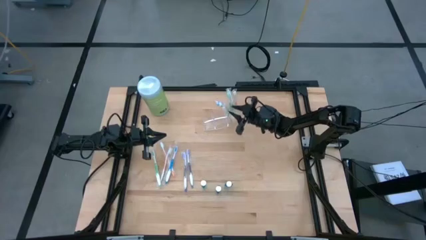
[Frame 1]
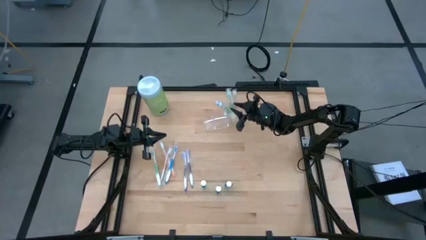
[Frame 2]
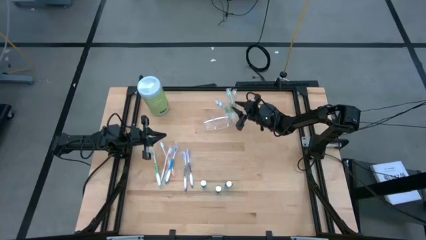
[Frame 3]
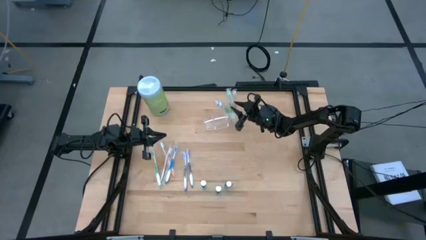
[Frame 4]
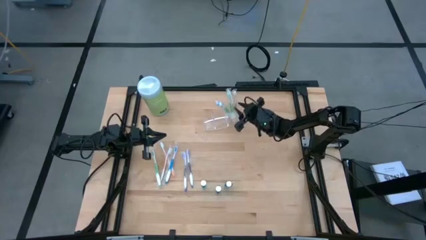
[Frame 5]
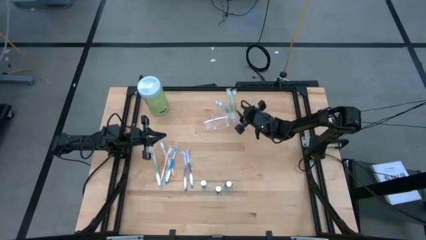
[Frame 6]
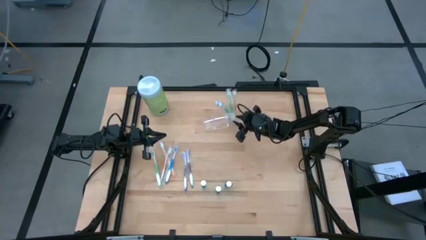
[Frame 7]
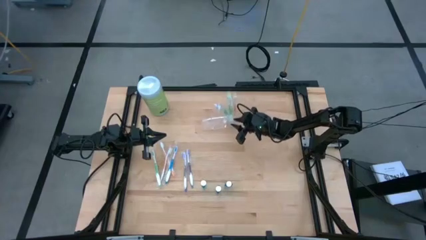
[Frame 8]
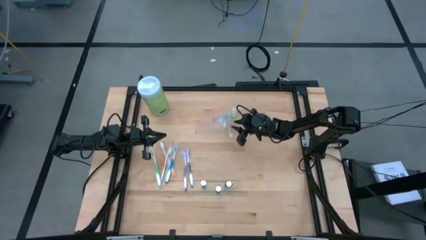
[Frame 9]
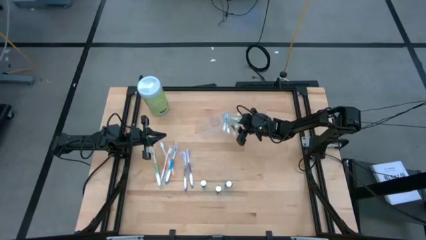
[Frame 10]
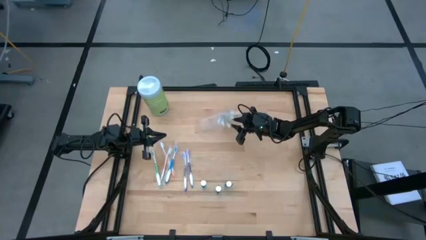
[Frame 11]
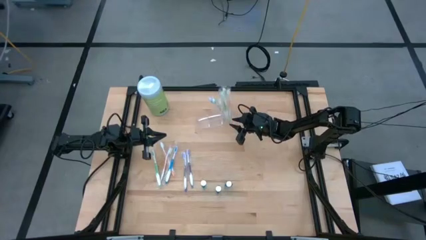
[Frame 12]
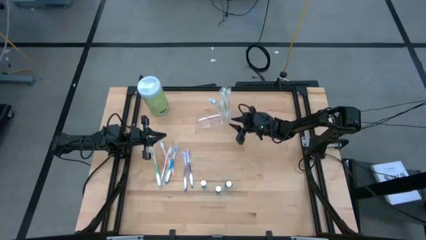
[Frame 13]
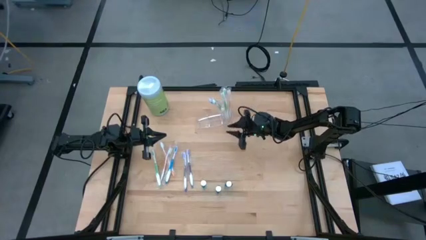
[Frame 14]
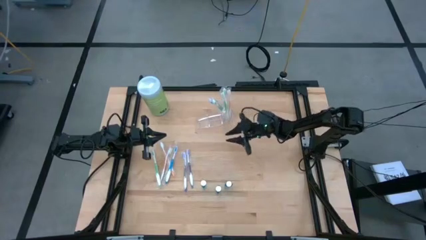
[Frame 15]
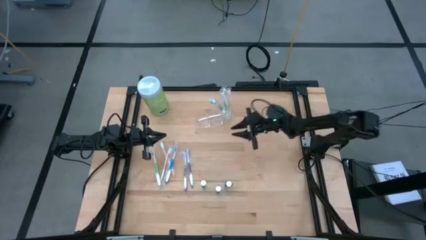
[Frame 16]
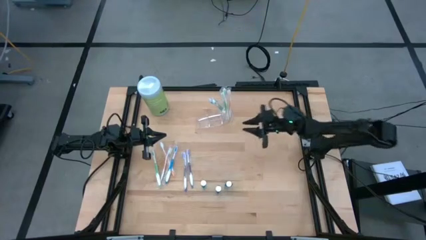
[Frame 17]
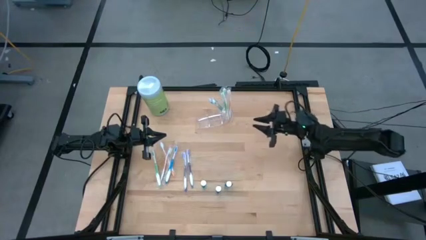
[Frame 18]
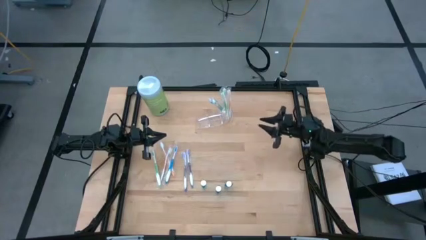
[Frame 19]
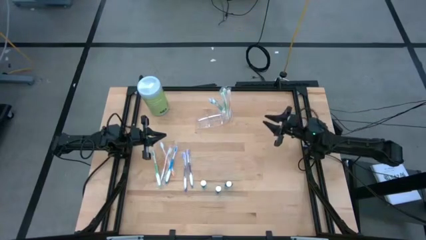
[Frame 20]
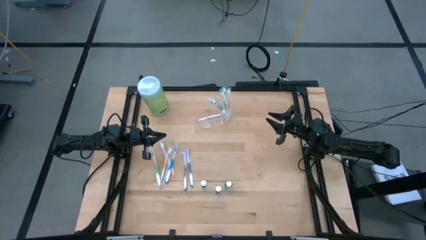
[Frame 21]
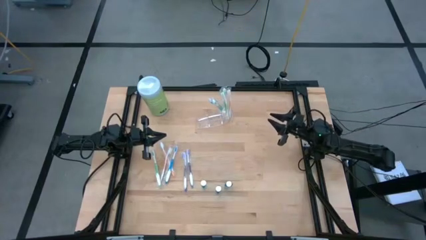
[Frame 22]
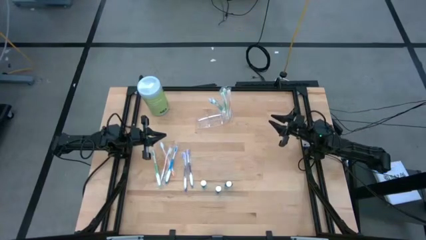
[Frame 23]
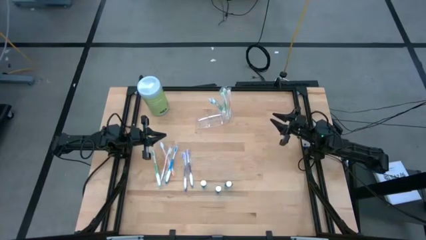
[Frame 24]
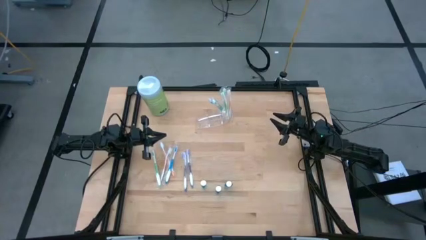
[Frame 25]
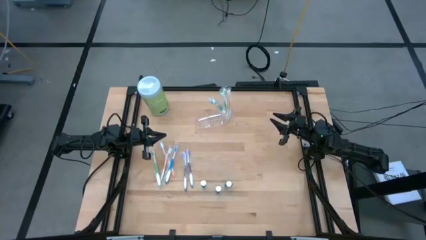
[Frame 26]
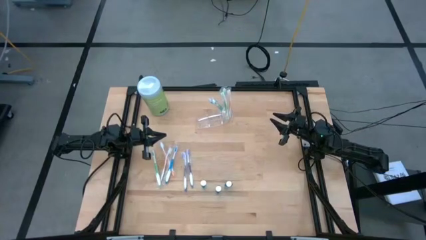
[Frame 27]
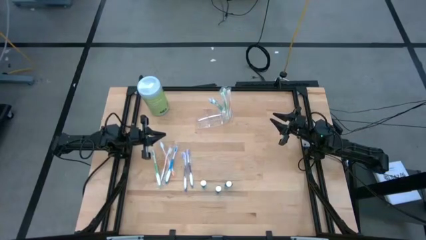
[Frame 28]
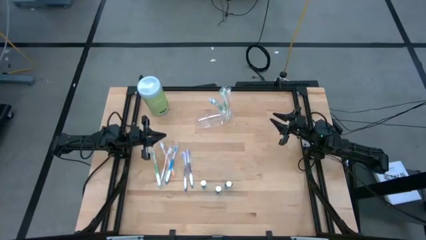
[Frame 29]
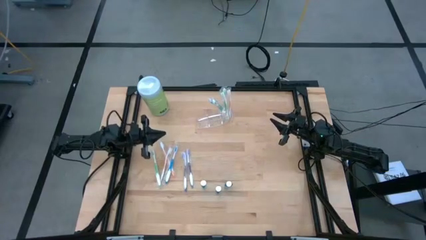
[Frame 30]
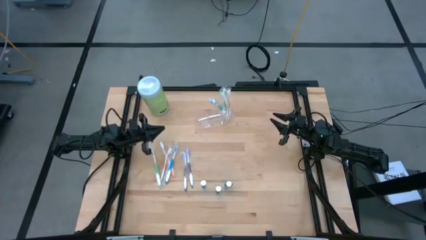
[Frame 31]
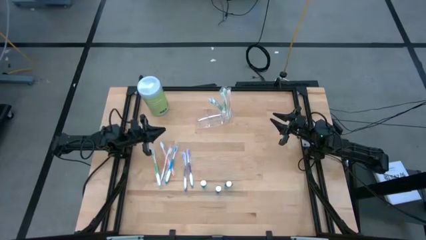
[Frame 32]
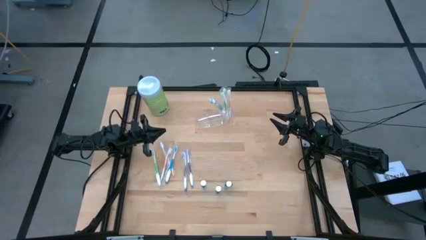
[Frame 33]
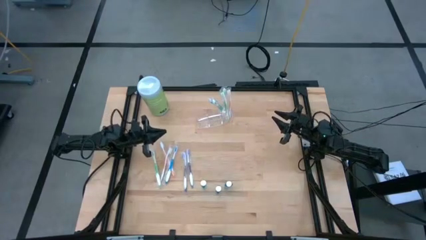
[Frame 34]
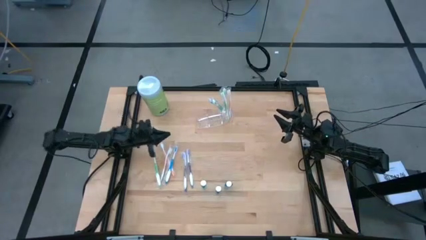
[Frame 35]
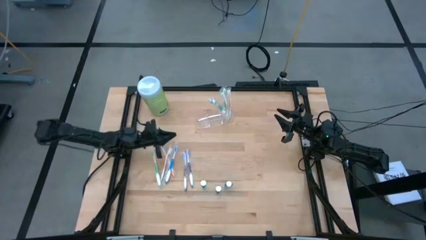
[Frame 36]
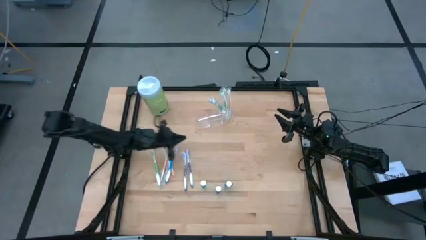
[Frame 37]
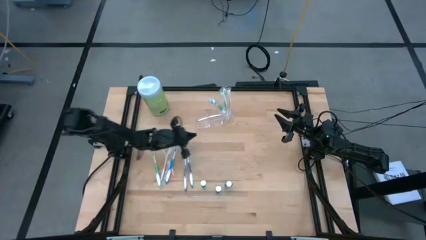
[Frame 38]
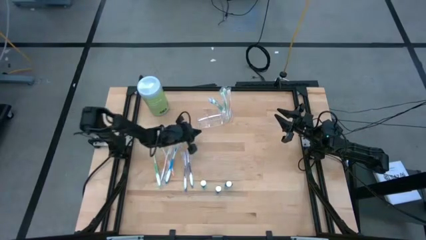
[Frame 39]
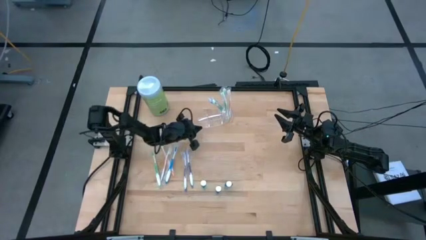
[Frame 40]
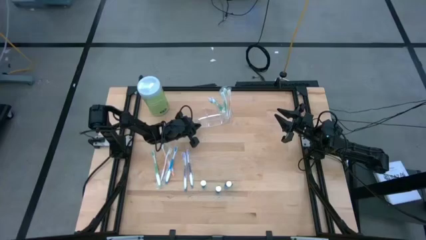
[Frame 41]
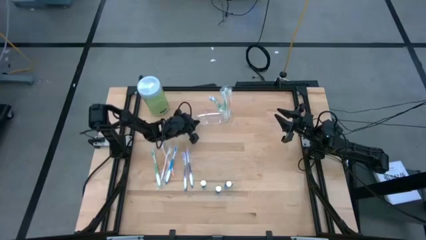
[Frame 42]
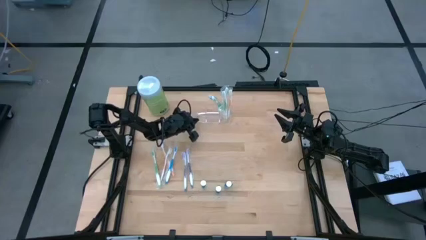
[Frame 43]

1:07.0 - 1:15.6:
Task: Pick & Place toothbrushing station
Adjust the transparent organizer

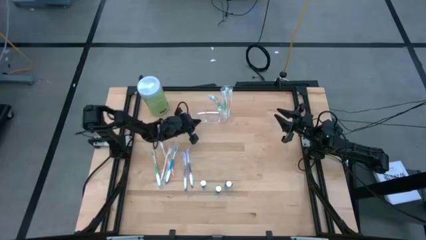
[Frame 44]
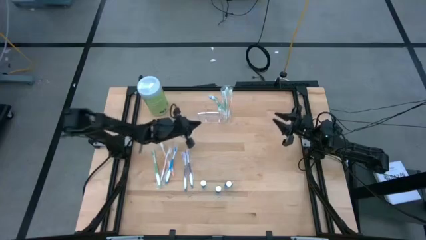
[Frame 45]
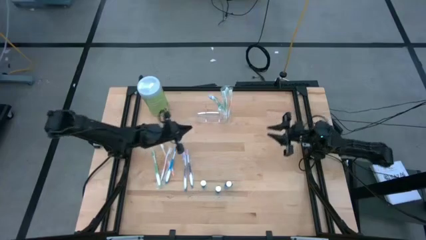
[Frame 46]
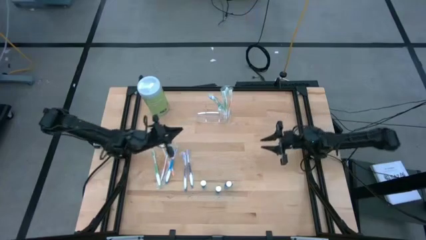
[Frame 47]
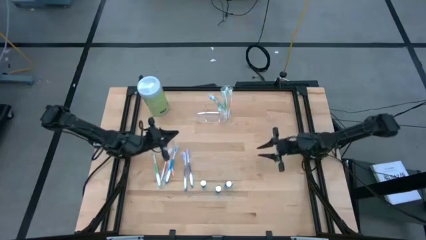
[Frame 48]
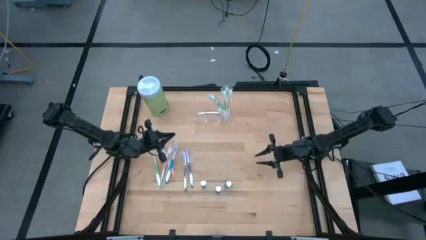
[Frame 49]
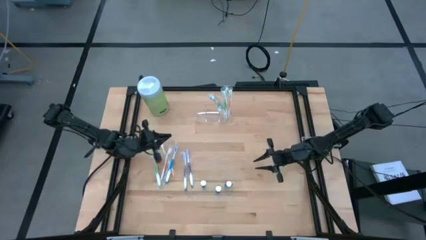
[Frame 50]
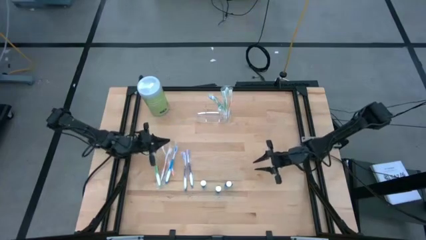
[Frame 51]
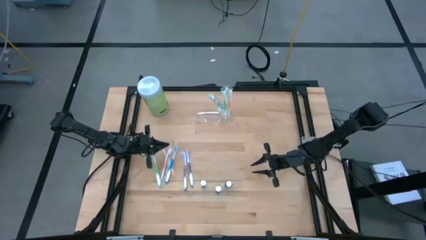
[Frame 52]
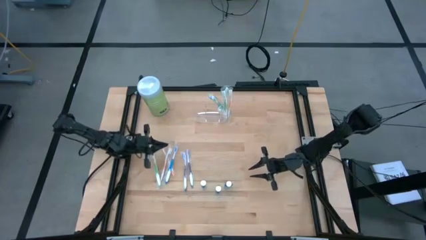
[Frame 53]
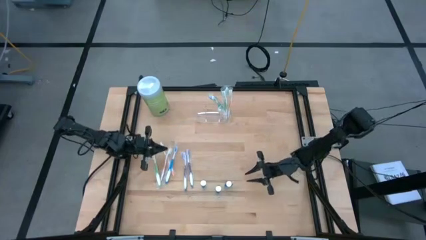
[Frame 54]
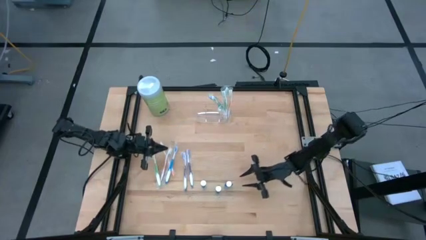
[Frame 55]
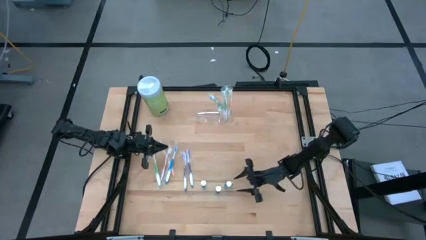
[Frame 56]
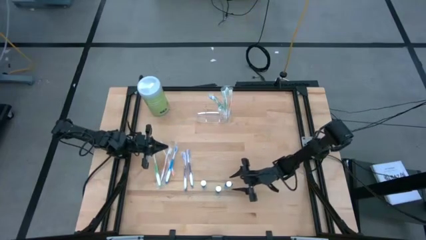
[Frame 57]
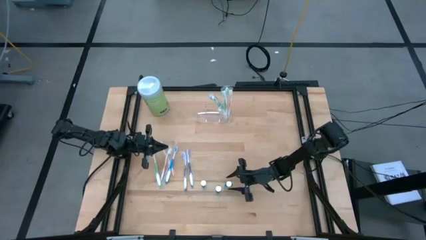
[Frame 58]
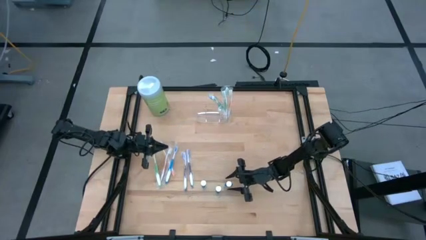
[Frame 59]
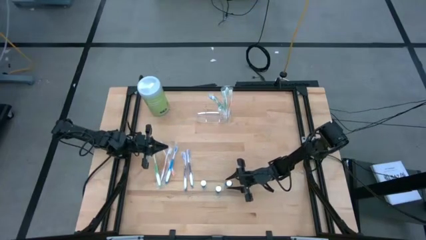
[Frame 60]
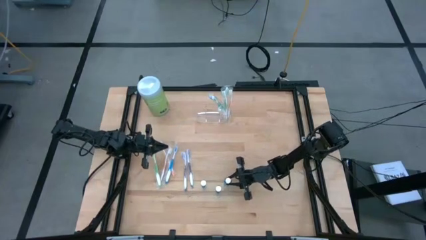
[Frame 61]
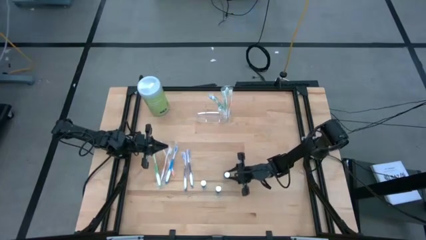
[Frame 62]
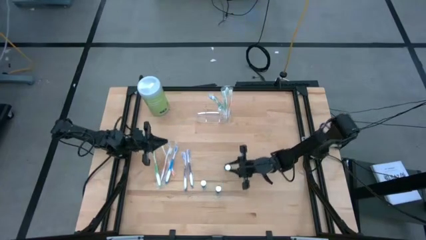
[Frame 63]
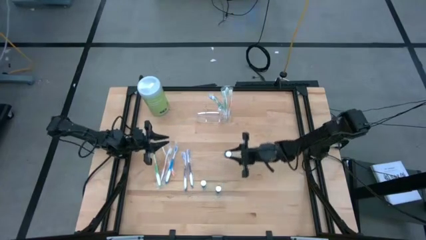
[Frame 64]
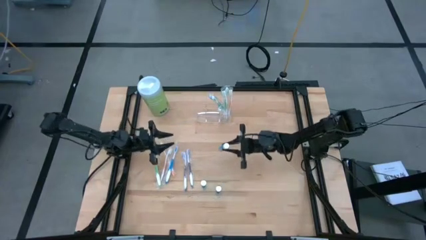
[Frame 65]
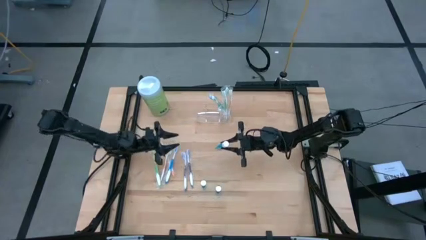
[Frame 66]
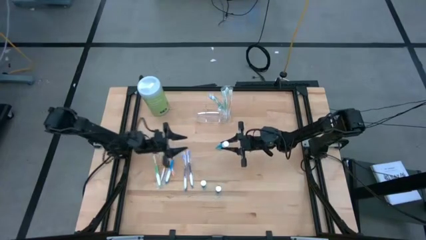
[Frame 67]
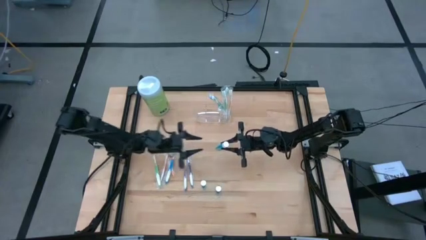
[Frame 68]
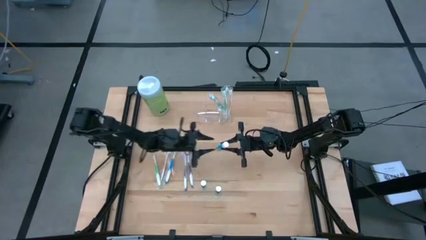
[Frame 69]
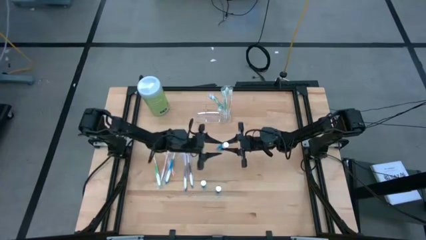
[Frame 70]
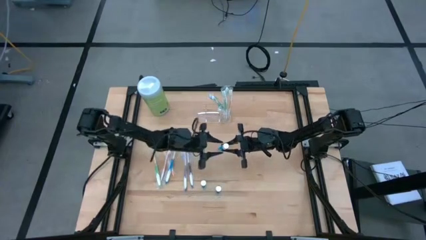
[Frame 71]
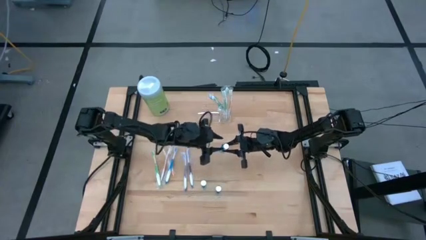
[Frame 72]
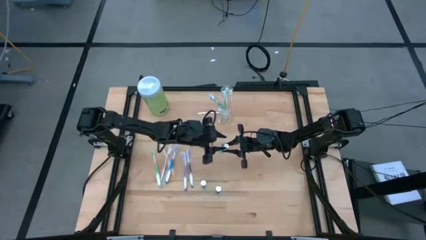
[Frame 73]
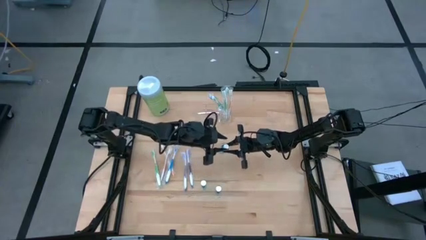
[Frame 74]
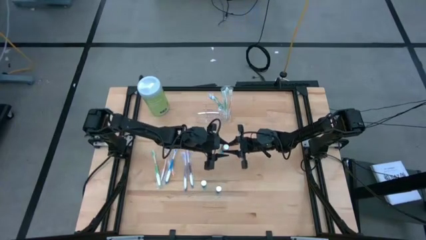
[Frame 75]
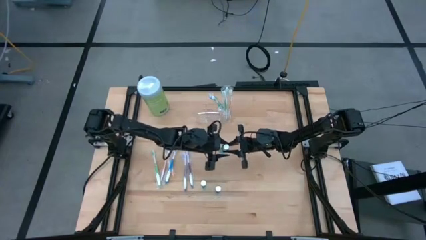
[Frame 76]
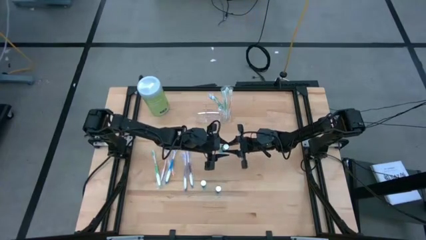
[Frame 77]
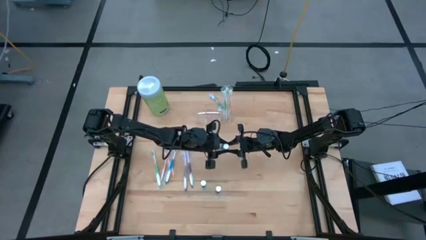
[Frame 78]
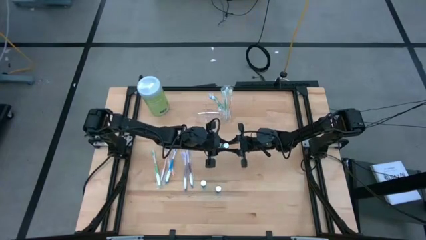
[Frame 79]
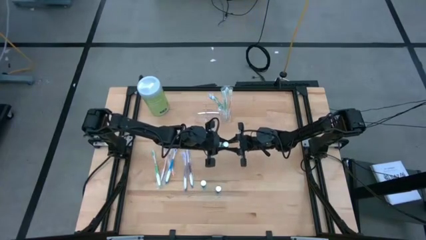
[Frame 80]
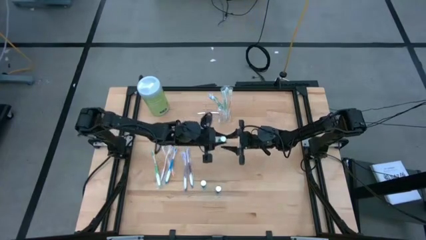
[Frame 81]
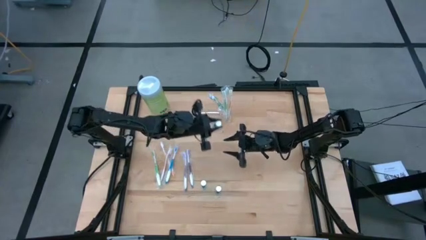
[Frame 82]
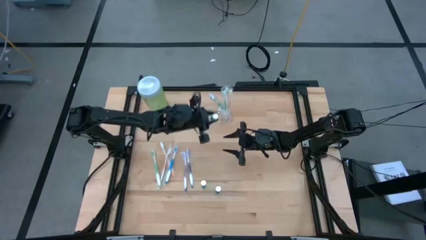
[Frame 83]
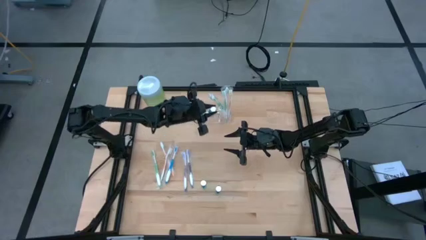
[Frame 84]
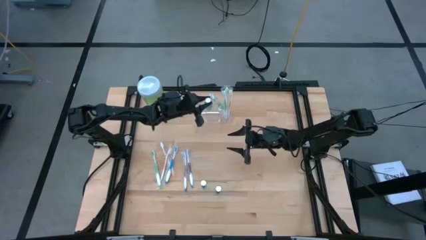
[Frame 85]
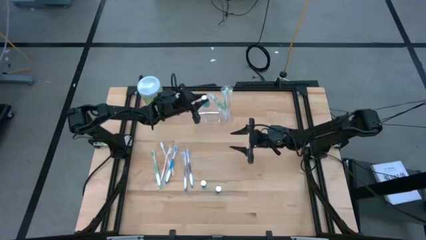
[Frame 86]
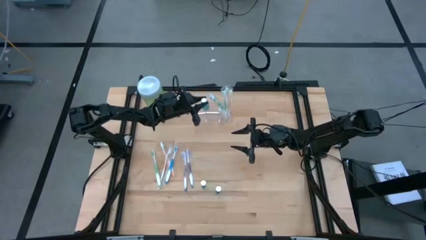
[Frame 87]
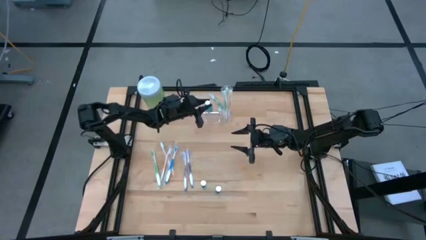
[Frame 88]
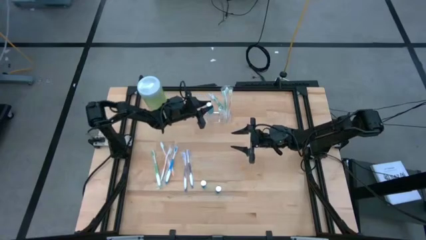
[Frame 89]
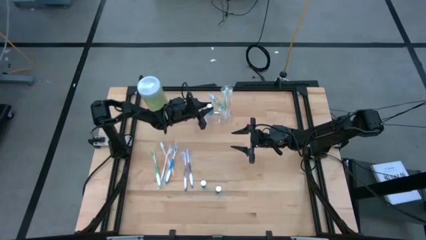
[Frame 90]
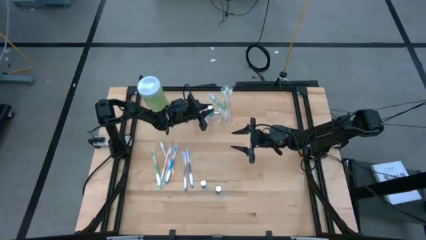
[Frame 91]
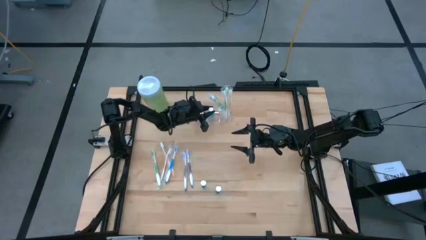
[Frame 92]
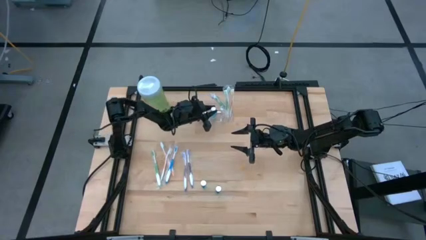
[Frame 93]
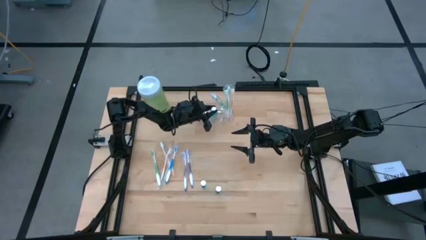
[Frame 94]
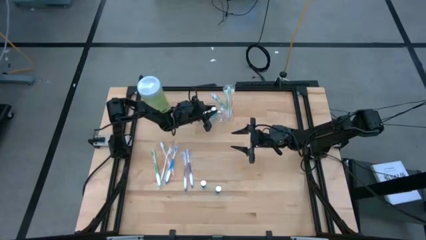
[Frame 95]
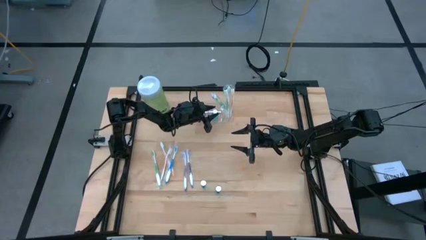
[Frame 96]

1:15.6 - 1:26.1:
Put the blue mouthwash into the transparent organizer
